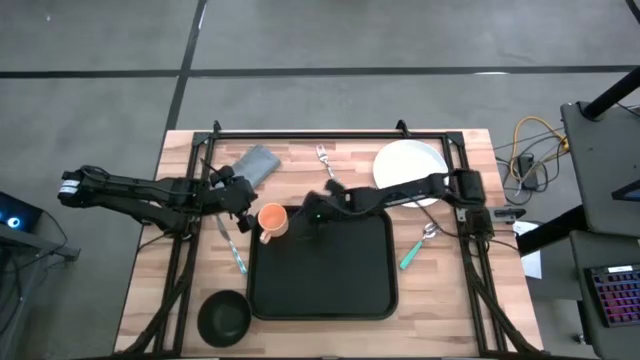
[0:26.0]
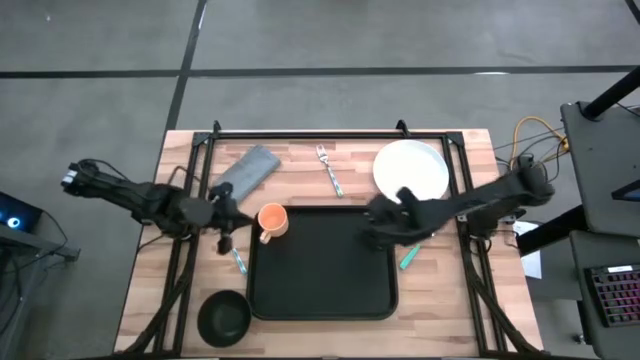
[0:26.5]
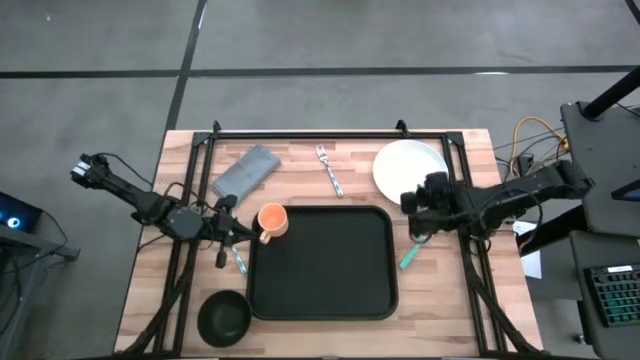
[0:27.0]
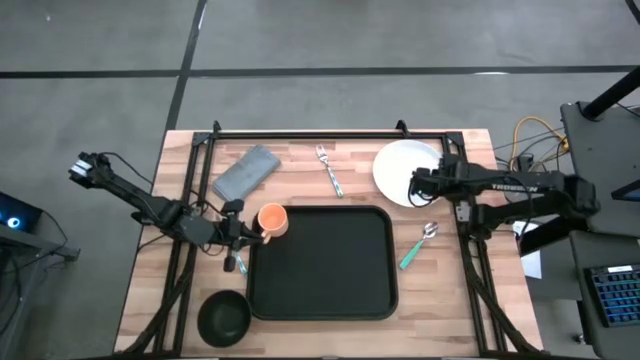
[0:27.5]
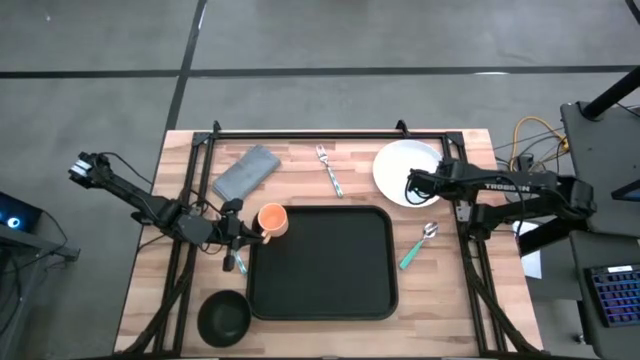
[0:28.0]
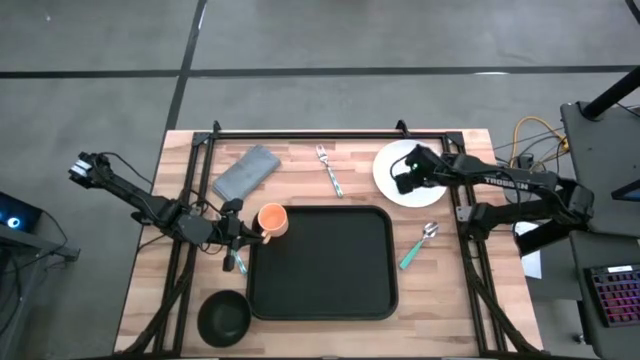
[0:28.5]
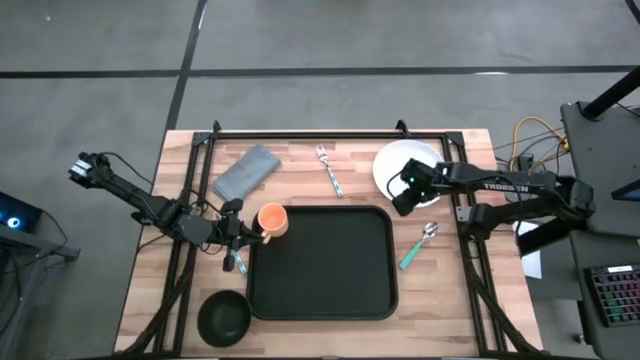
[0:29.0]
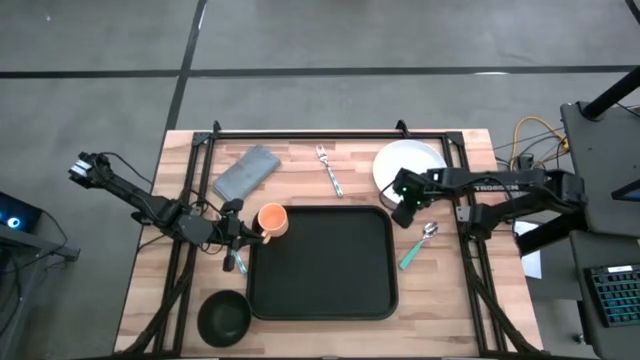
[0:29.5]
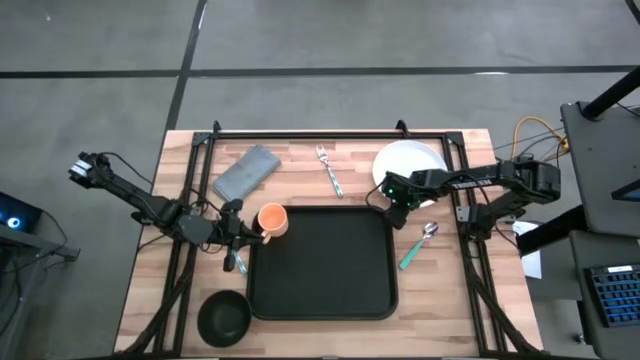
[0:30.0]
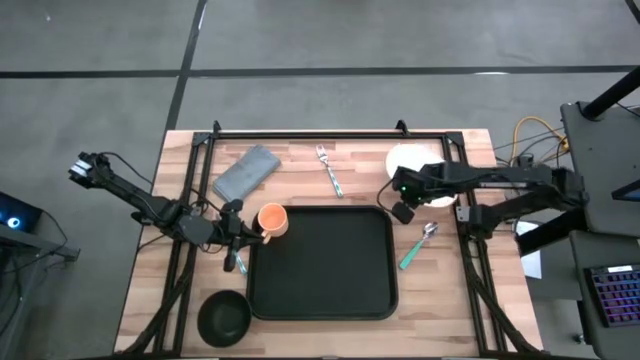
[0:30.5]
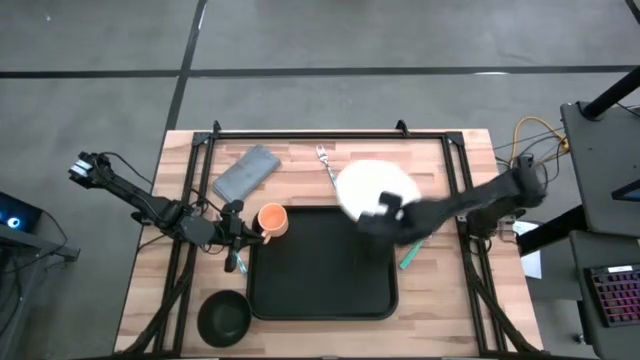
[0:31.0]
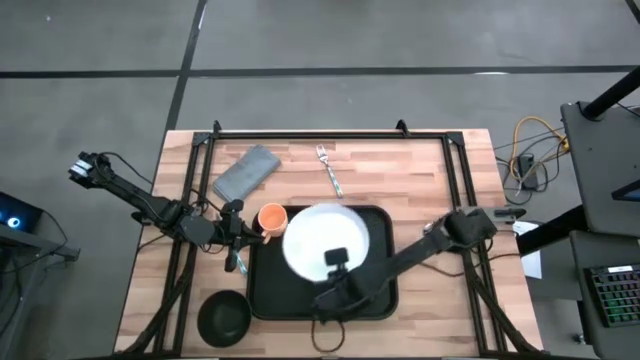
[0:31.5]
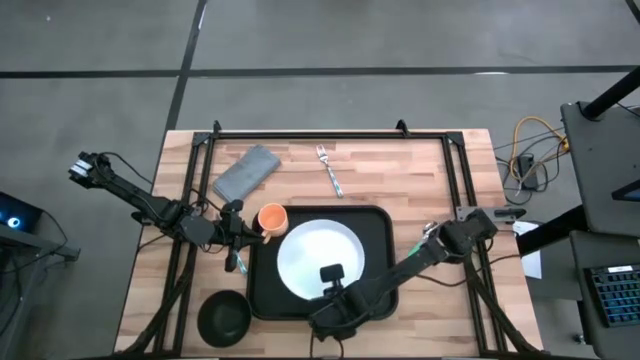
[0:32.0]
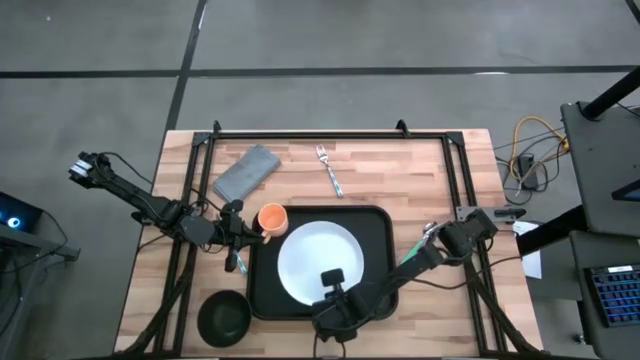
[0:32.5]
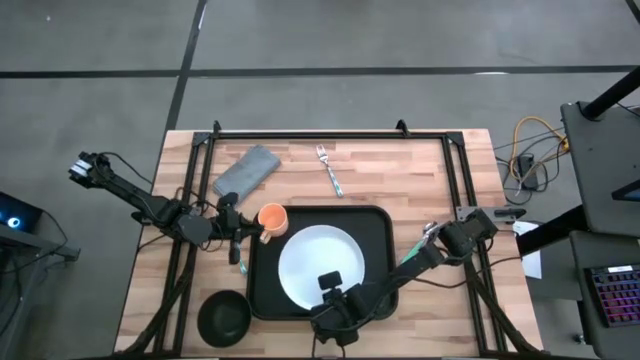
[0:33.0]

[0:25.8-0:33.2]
Task: Set up tray
Put the white plate to the right of the orange mug on the black tray

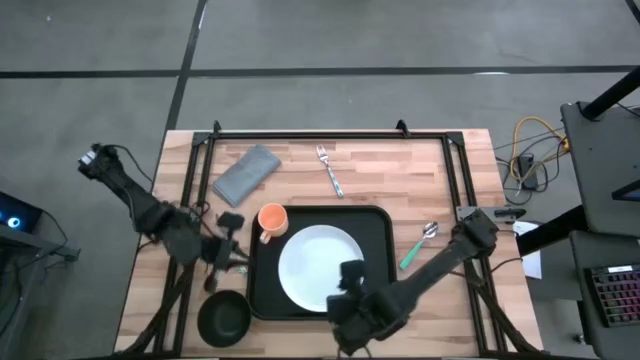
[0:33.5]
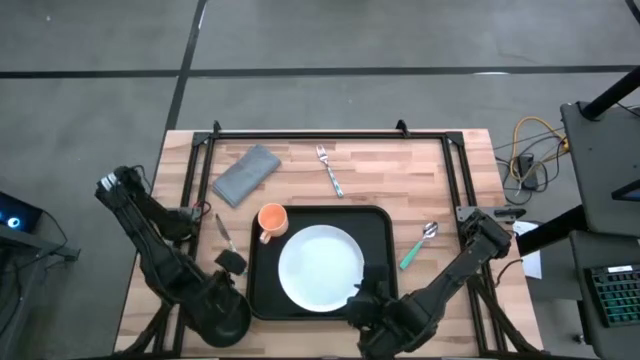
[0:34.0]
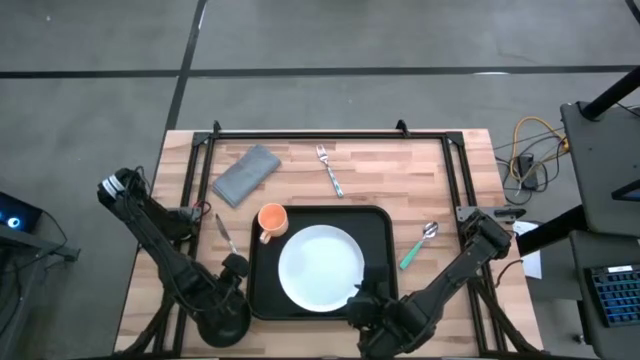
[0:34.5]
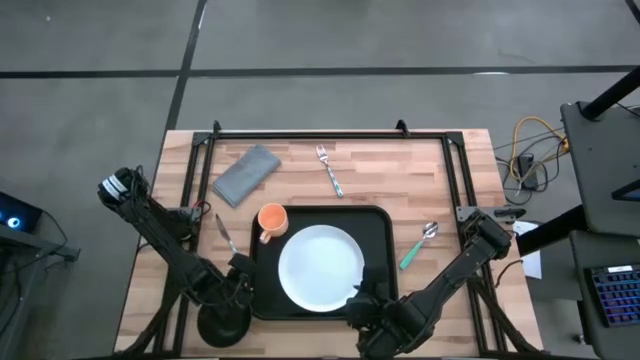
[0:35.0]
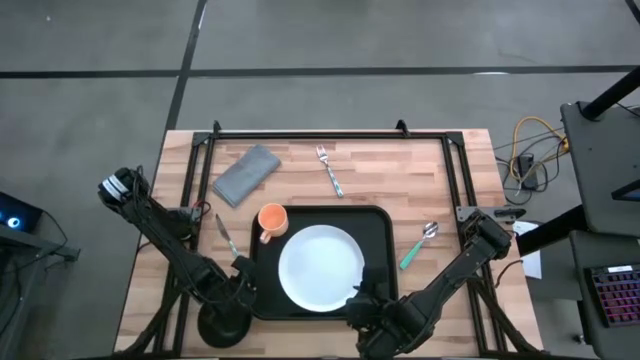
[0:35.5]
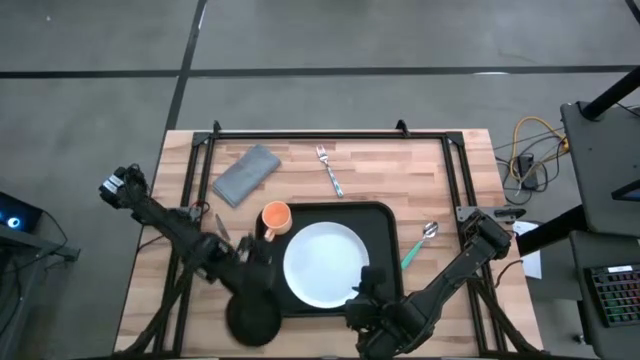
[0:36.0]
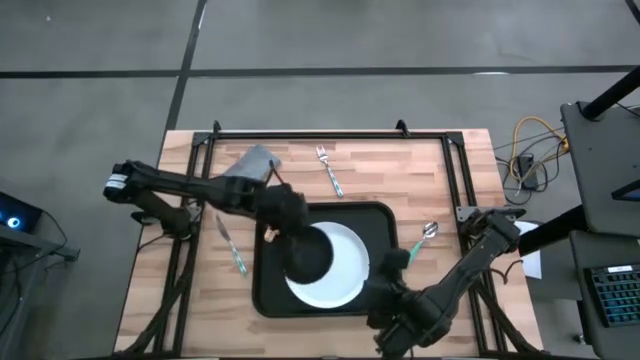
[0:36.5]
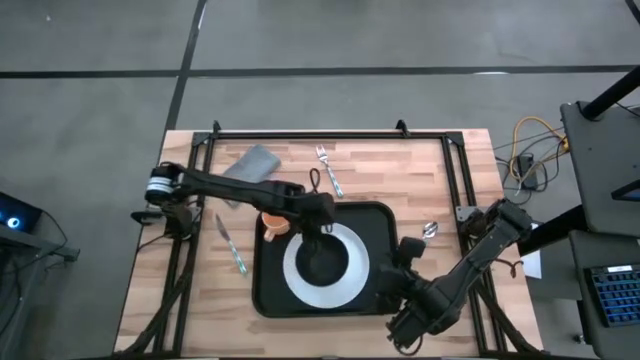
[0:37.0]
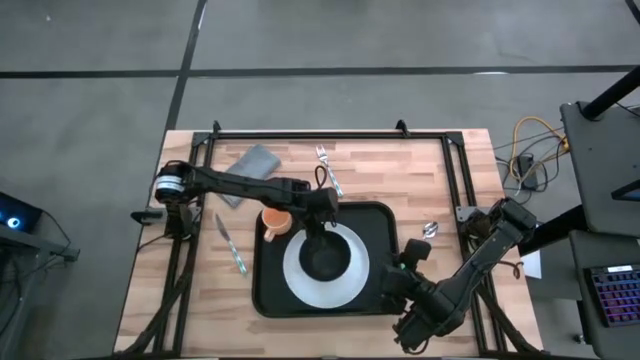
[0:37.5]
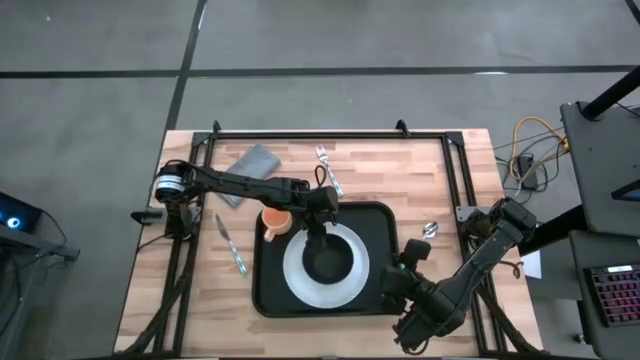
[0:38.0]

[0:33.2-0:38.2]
Put the black bowl on top of the white plate

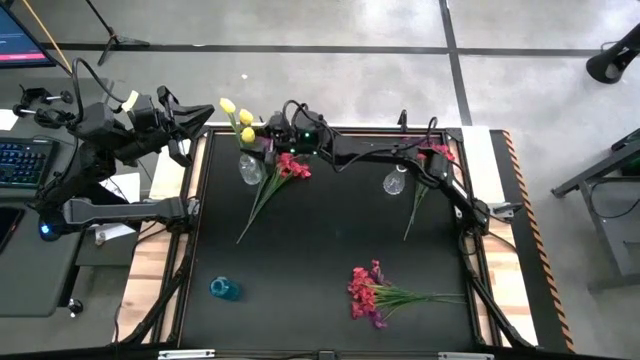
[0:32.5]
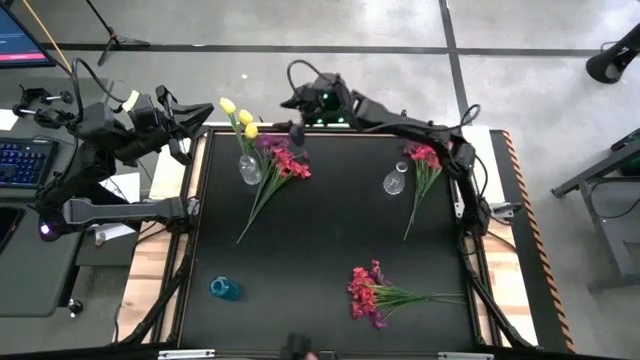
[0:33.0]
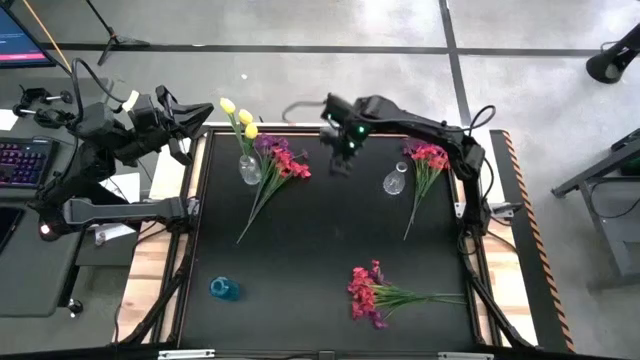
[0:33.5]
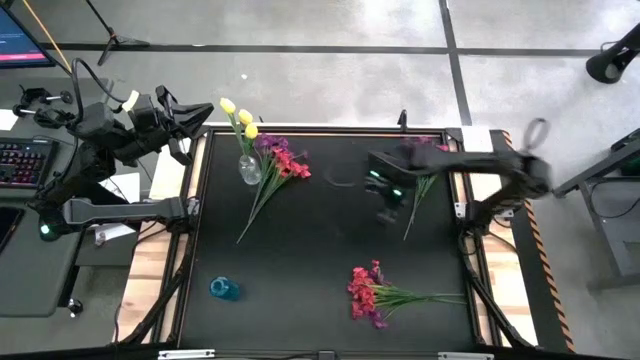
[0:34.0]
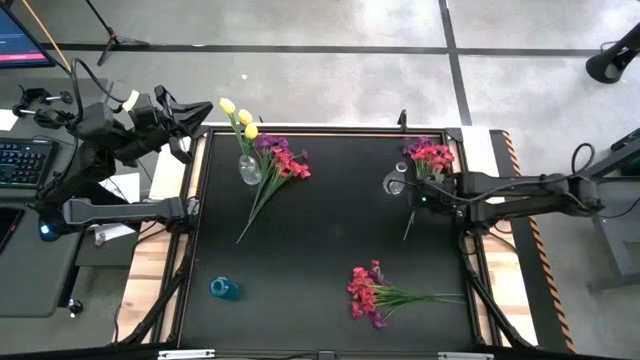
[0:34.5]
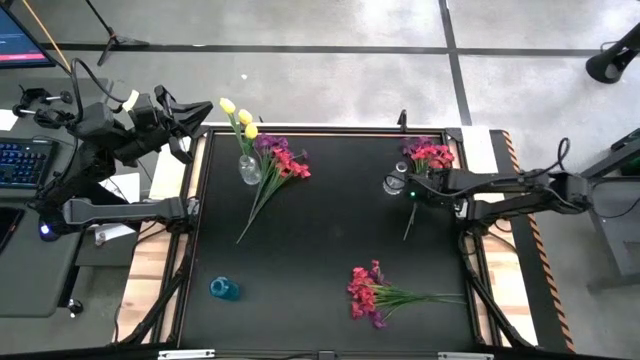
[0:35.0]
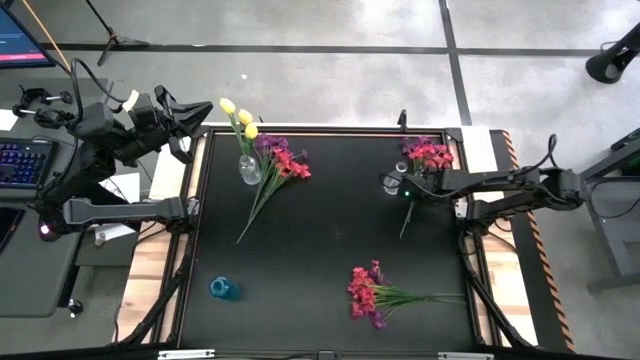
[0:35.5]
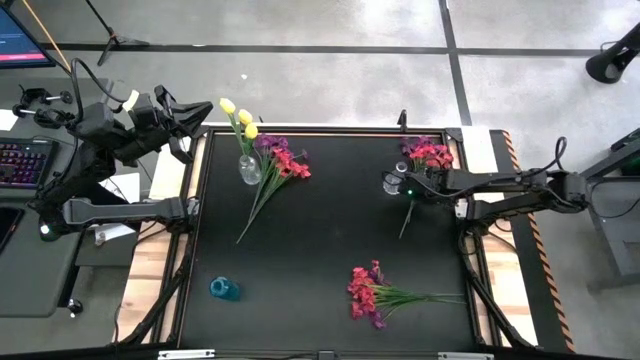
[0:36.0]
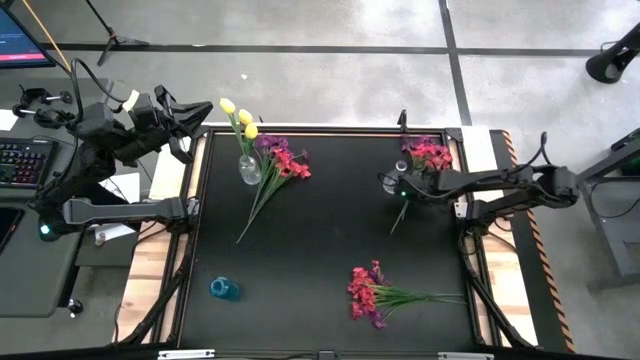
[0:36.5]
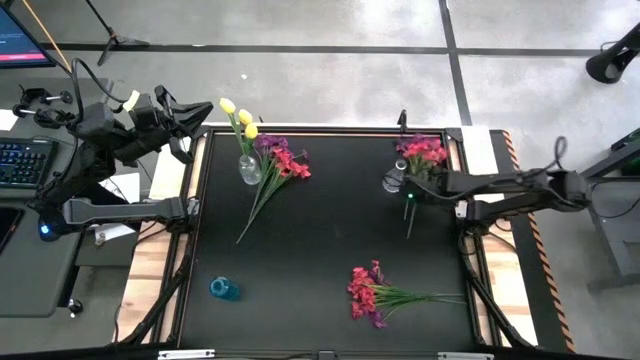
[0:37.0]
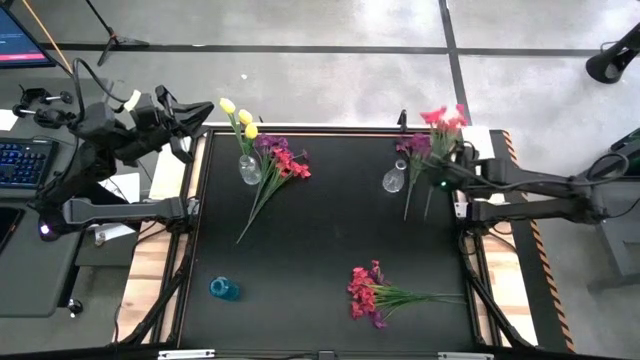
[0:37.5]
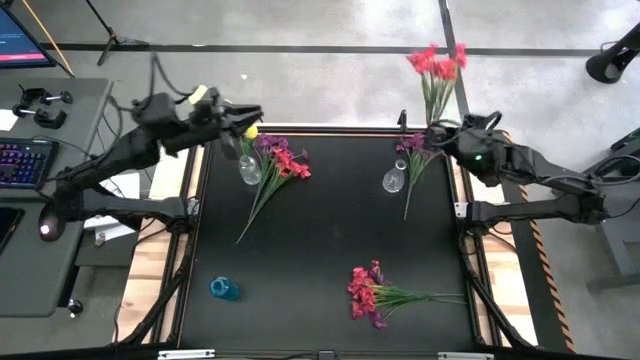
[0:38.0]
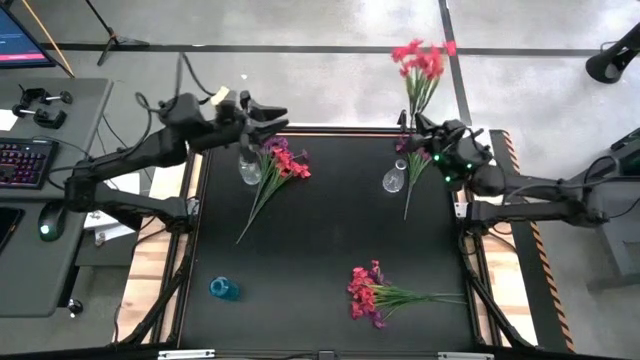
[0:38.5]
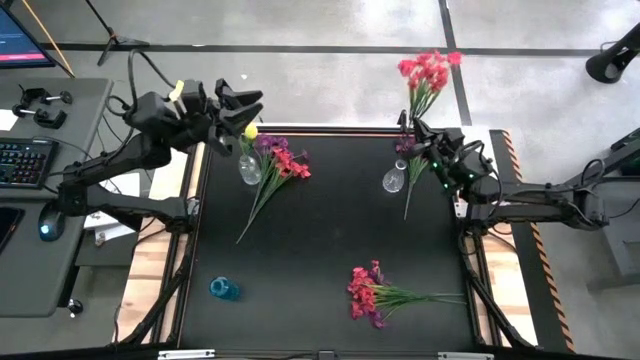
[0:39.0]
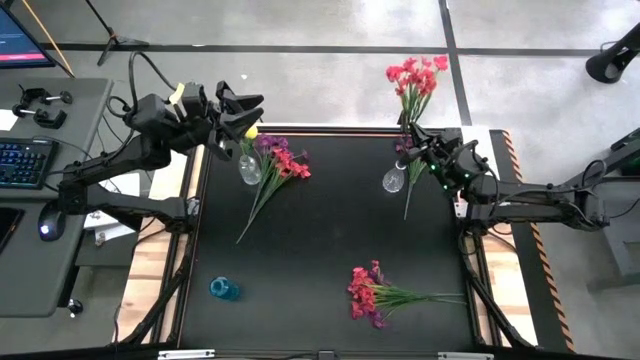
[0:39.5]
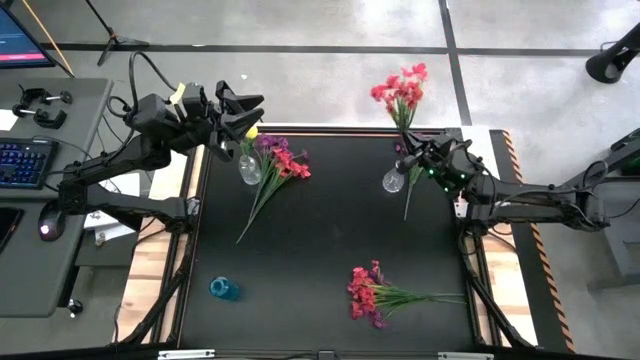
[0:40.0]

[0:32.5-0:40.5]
Task: Sort flowers into vase by color
Put the top right red flowers into the right transparent vase

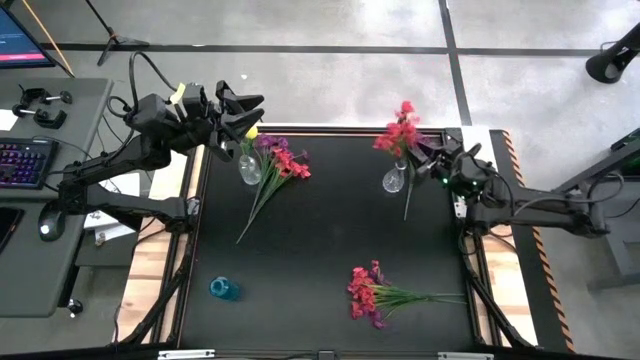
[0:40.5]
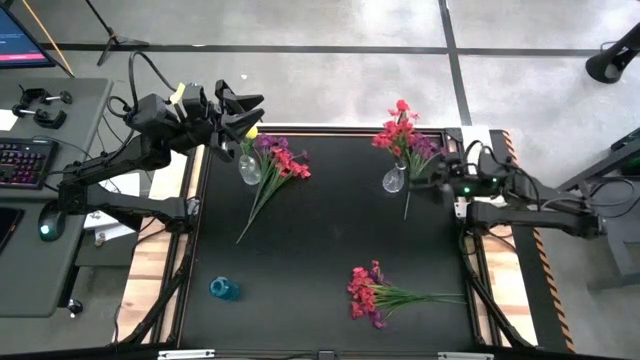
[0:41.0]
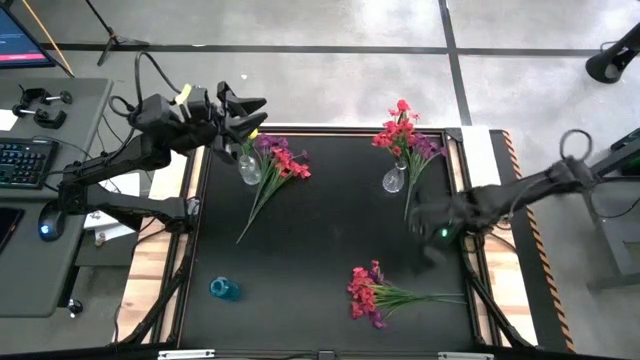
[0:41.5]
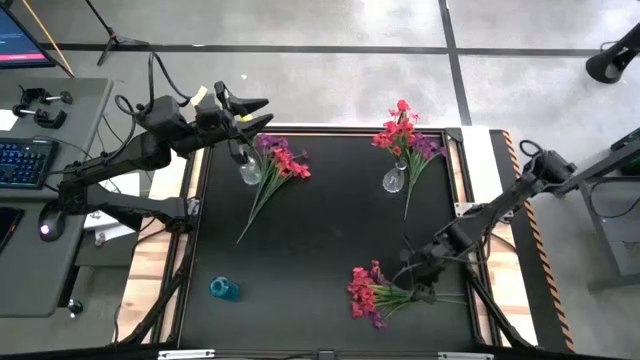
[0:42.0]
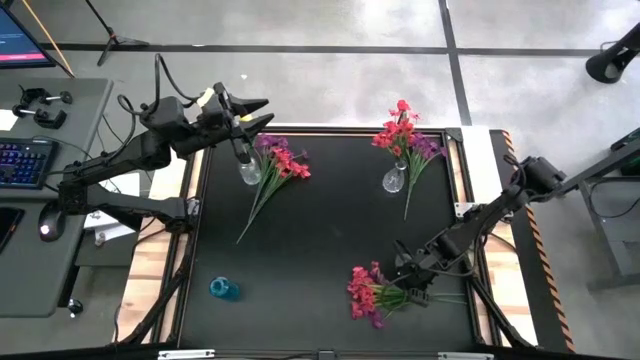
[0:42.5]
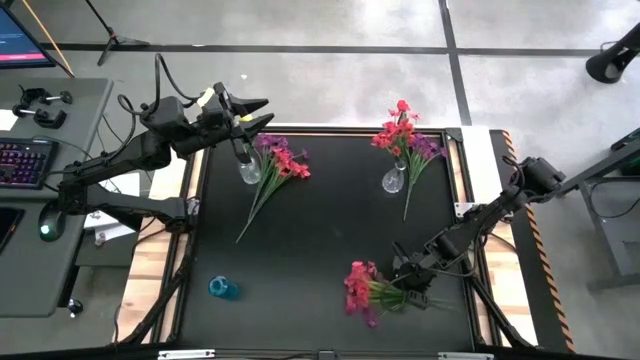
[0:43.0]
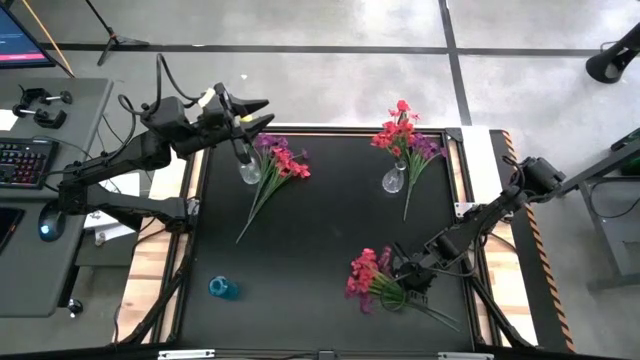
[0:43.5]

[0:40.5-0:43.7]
Put the bottom red flowers into the right transparent vase
